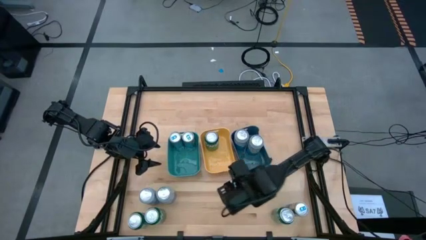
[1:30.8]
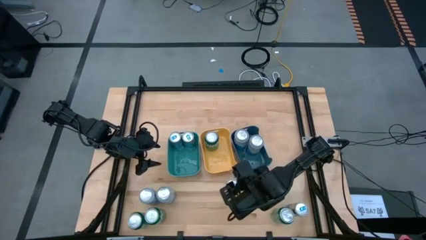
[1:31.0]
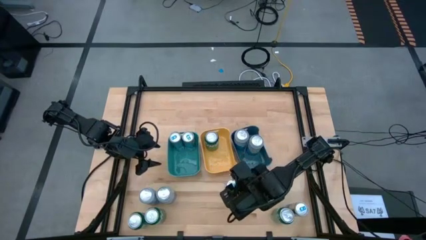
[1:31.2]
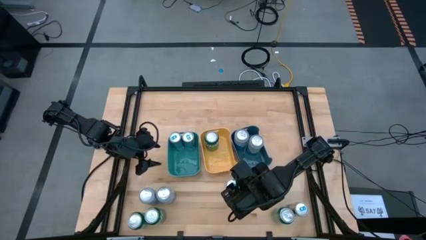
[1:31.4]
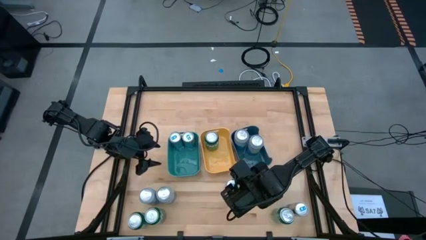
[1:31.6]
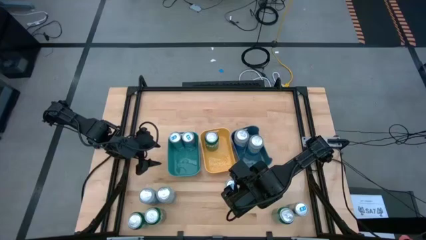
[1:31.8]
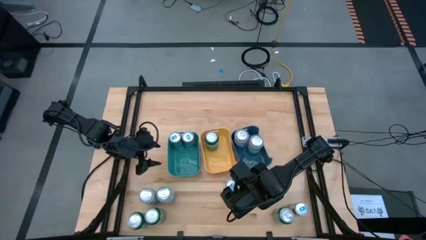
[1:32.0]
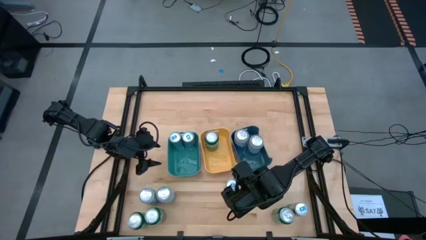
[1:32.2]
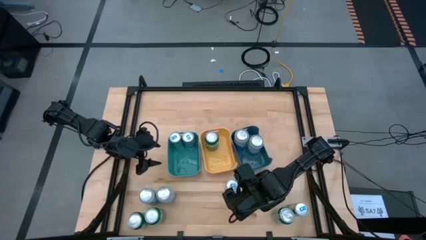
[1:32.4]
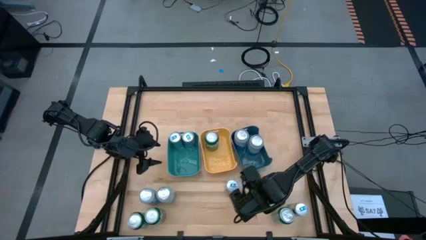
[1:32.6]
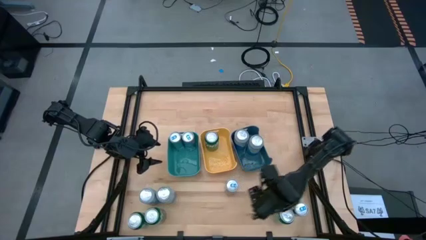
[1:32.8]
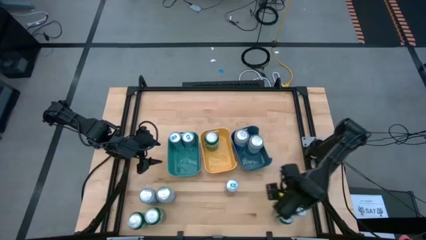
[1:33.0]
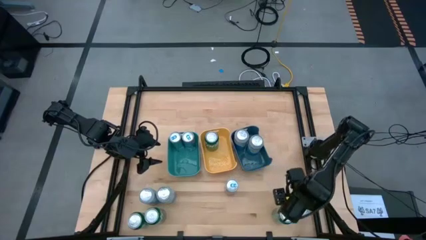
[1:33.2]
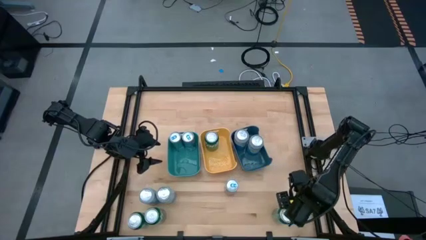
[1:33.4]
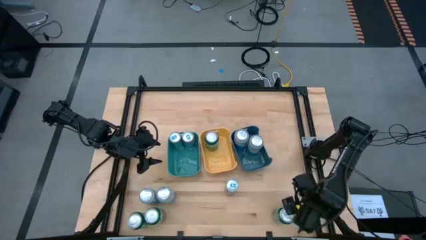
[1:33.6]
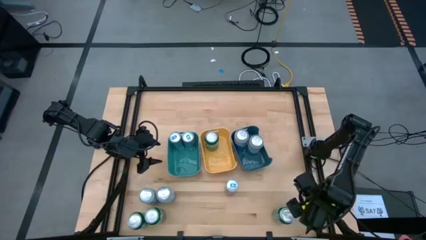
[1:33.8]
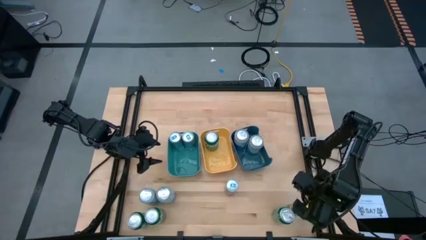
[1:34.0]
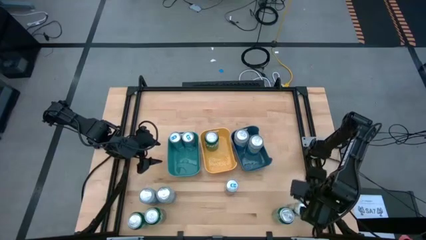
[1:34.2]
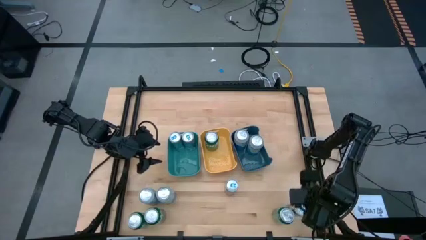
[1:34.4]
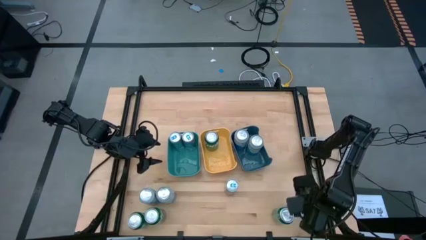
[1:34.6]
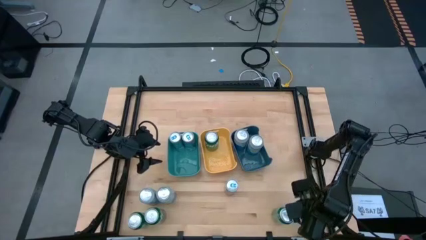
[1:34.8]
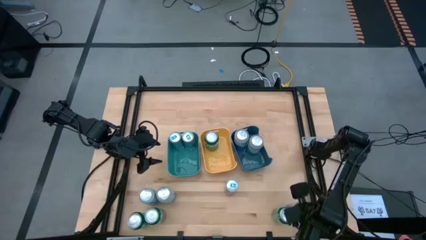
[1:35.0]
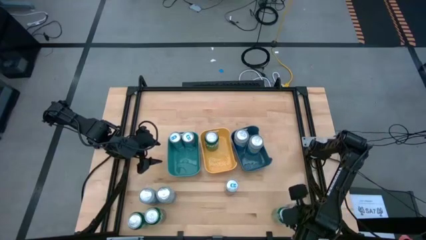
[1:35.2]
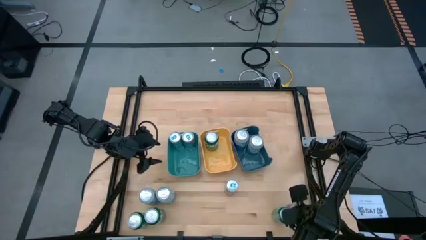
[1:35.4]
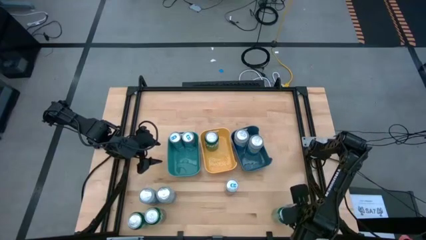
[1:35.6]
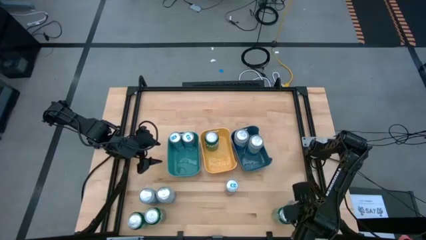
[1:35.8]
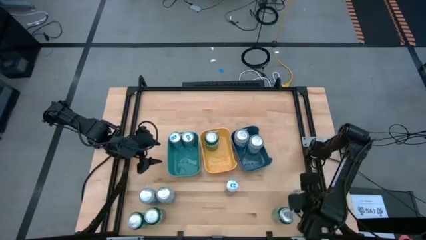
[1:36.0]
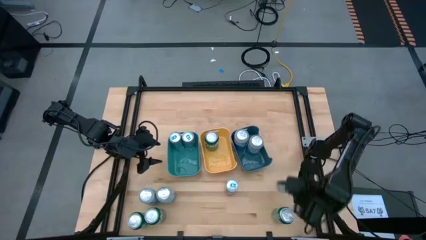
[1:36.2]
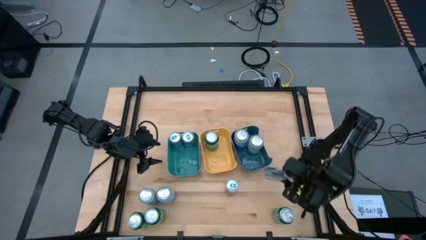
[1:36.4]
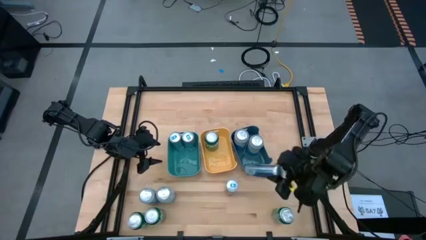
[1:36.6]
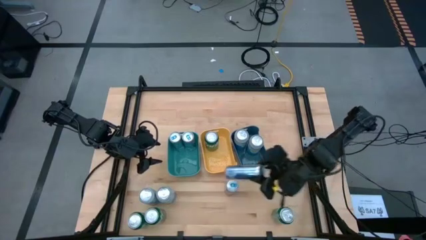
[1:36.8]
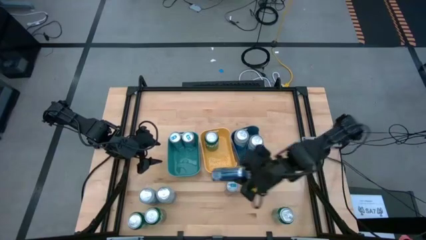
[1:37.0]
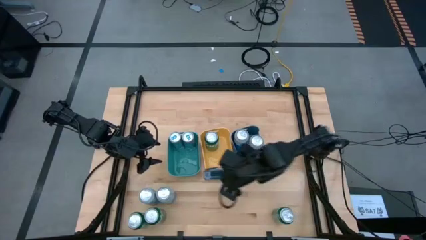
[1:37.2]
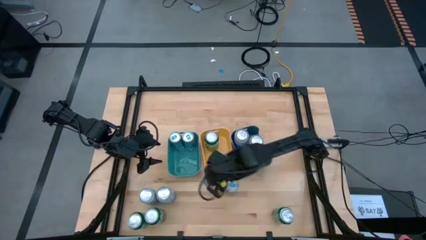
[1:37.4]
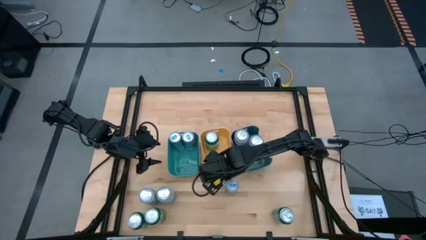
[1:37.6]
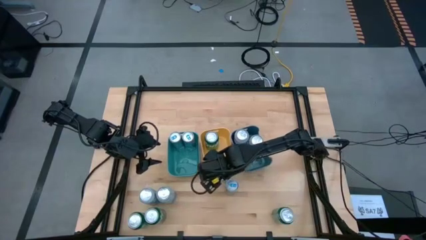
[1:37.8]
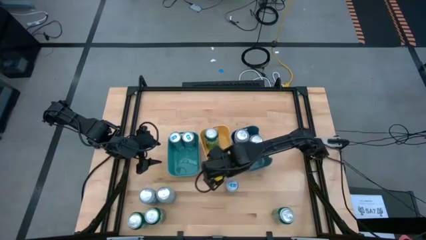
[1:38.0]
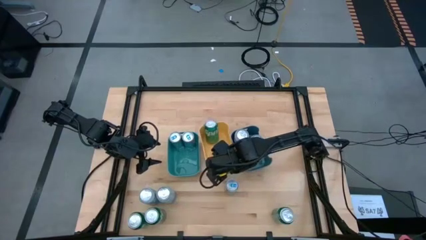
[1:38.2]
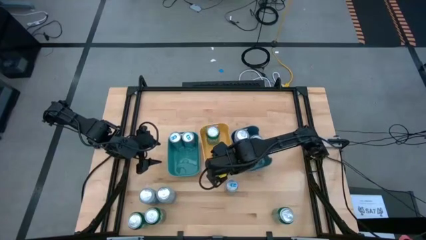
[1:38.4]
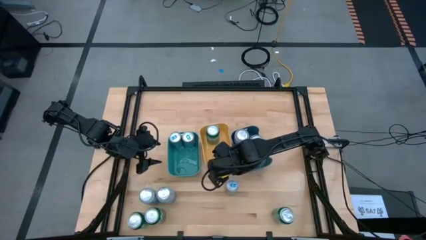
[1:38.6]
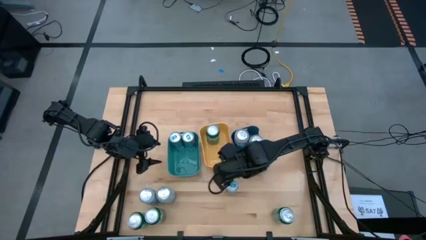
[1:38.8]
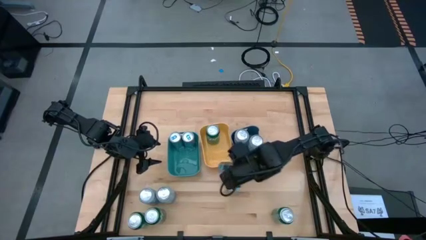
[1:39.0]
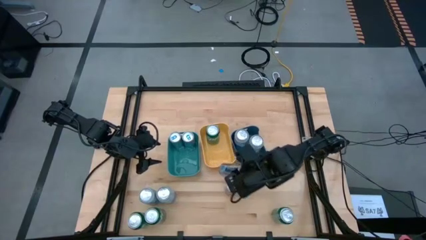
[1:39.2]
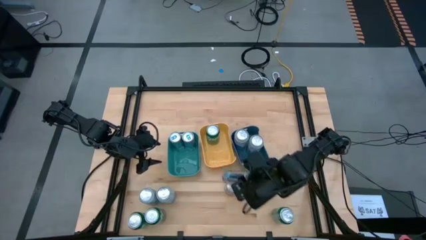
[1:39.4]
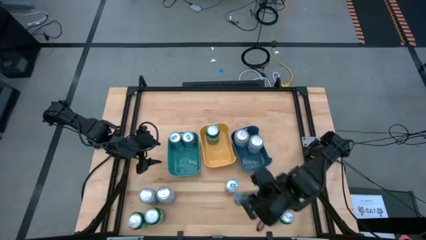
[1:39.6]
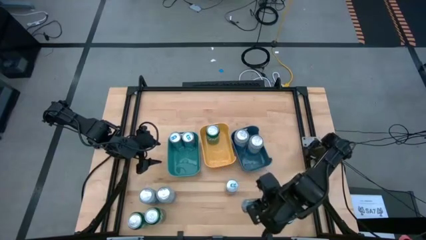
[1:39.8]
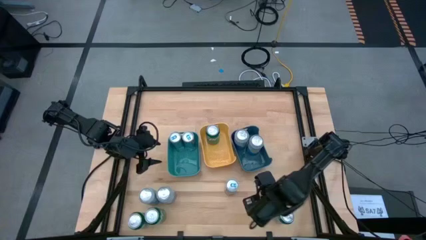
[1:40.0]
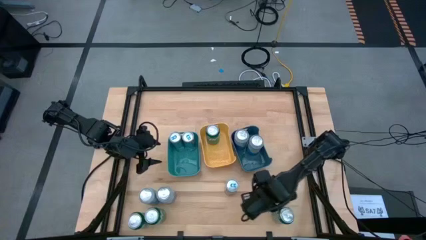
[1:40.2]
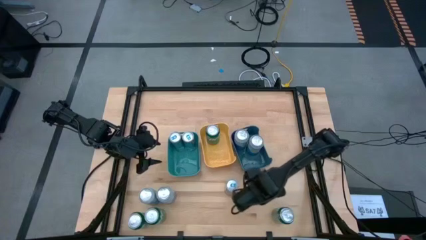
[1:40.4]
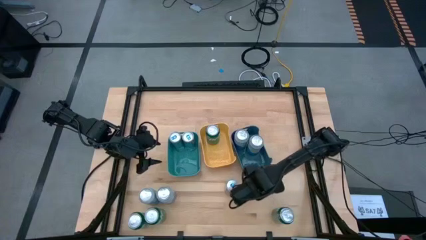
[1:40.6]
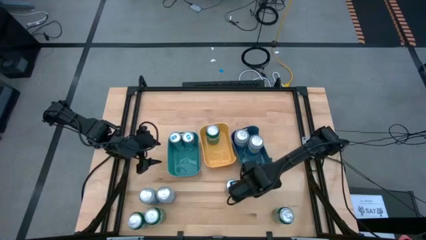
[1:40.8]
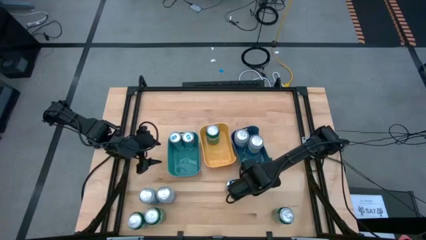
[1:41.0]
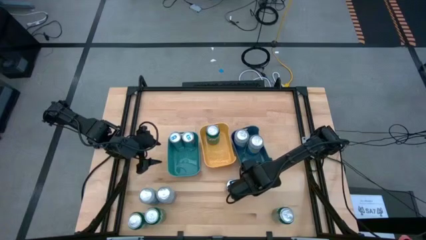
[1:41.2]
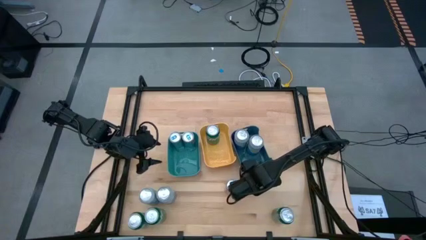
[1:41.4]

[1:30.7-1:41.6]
Task: Sort soda cans
Move the white and blue soda can to the center

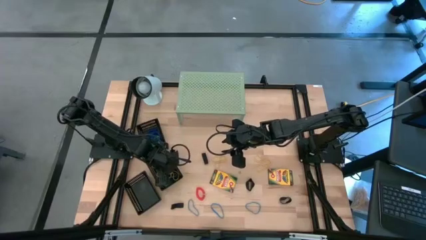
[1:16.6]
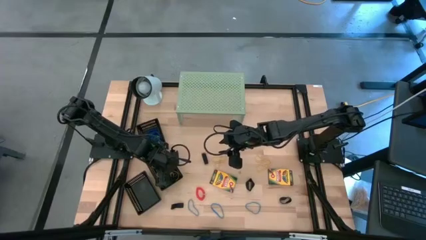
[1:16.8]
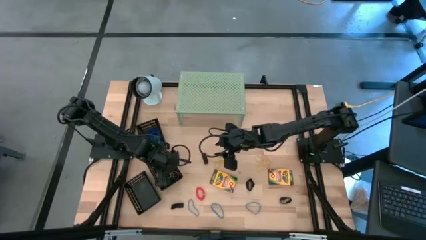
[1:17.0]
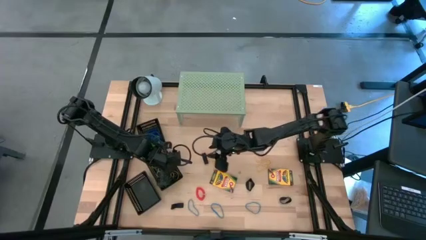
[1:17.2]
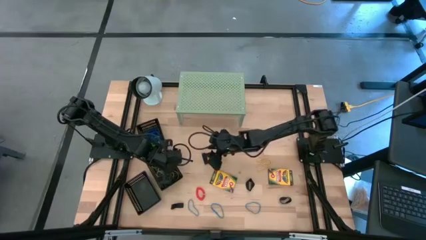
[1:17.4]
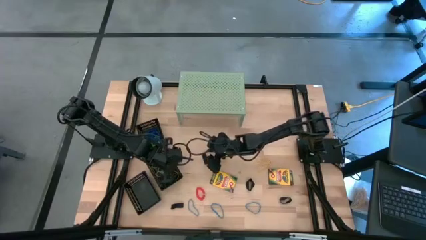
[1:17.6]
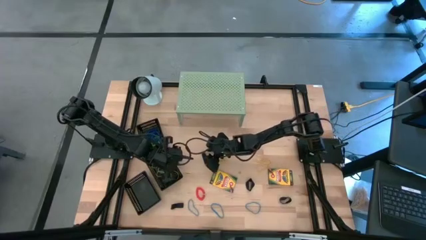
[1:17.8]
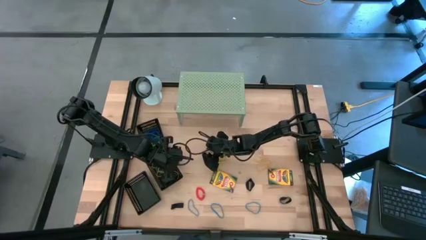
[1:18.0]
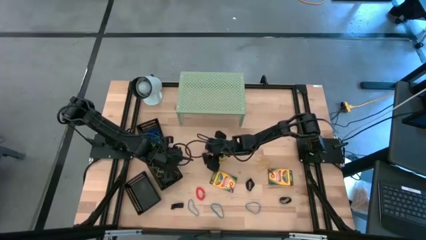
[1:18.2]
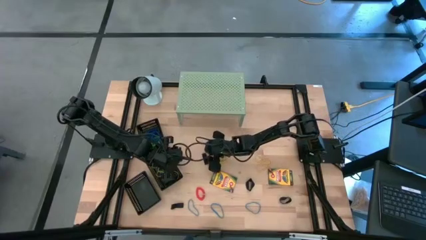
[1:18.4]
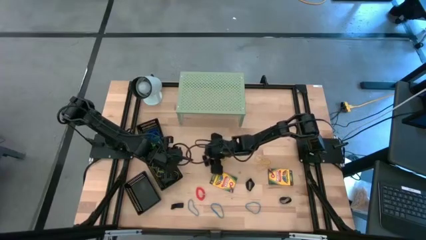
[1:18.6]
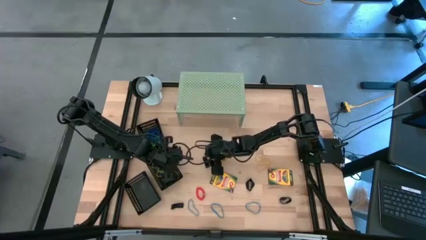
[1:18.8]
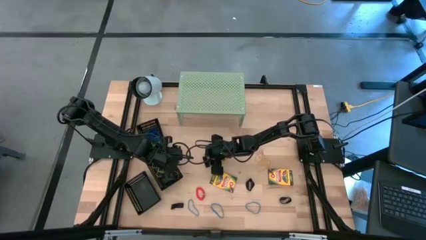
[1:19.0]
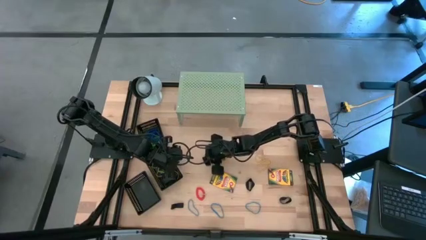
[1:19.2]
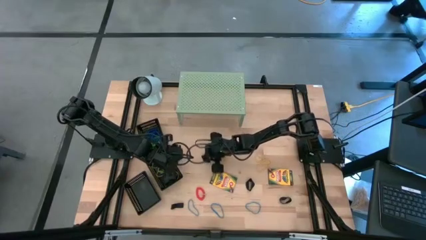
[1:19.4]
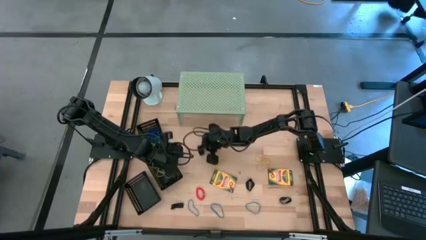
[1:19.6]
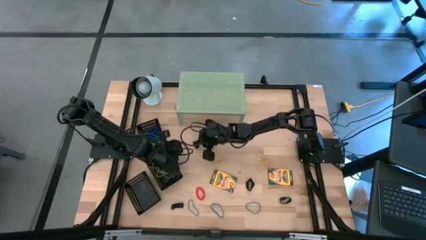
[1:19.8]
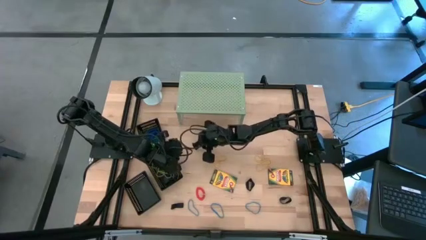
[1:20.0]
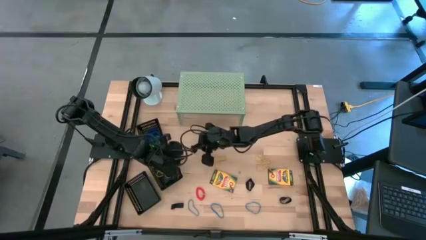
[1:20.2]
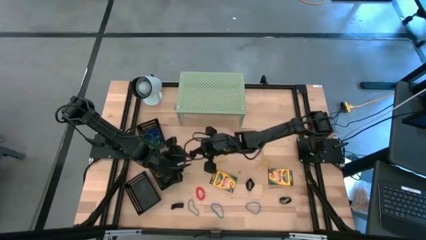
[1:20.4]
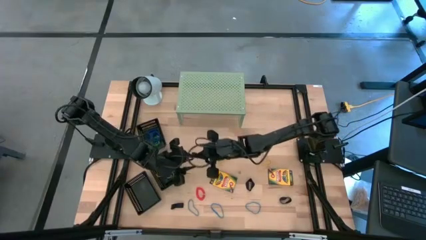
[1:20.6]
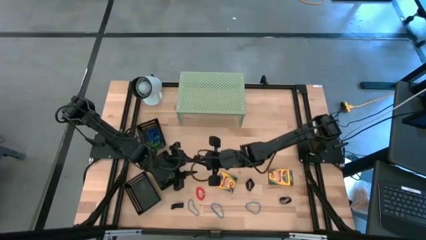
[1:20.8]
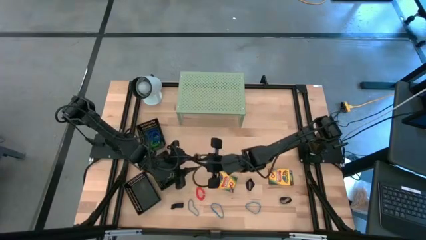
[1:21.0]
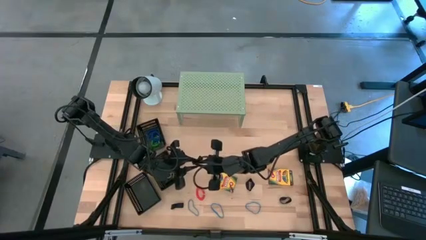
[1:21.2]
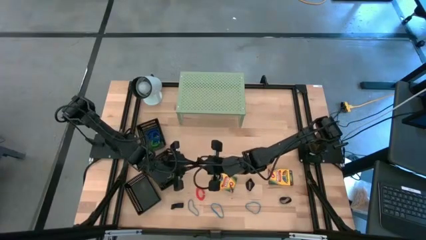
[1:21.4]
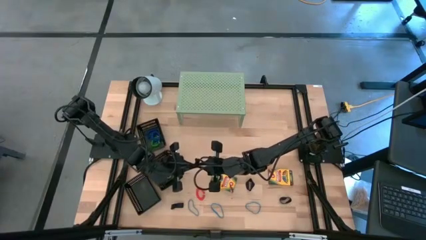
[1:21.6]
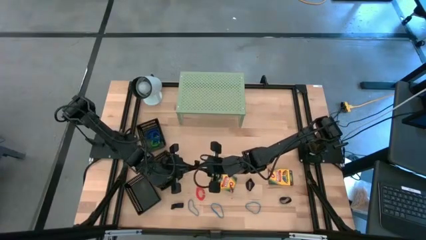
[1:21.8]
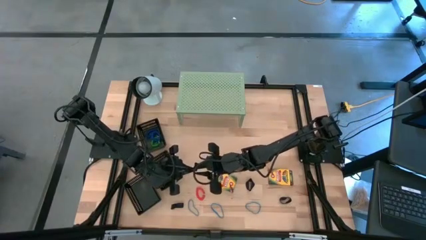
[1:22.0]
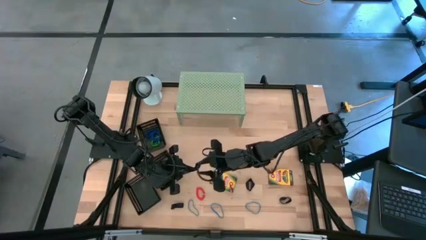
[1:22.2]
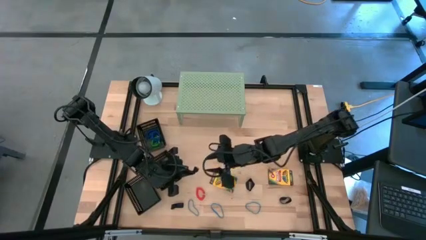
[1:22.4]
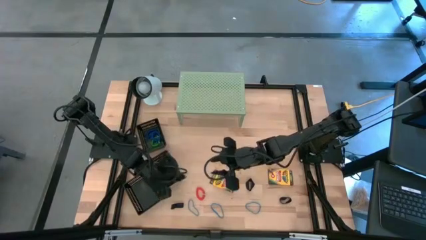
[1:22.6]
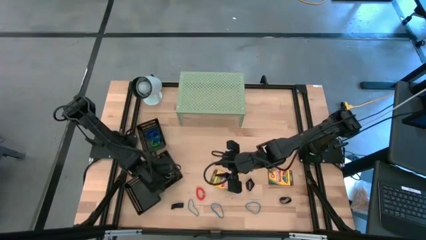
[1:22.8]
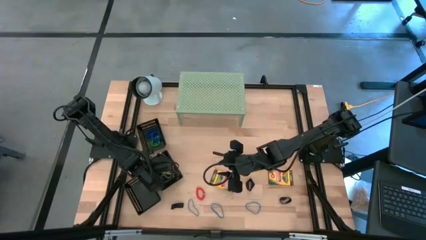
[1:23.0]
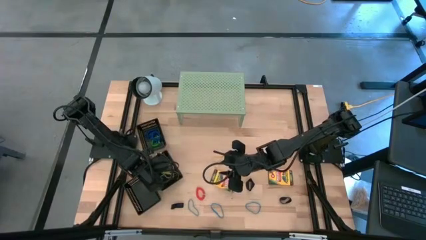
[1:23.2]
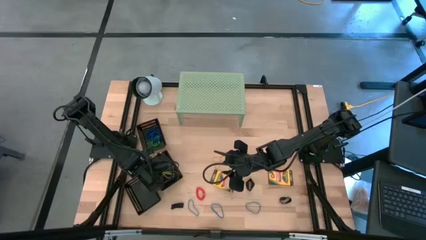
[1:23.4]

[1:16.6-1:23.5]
Task: Pick & Place Office Desk Supplies
Put the black rubber band into the middle black bin
